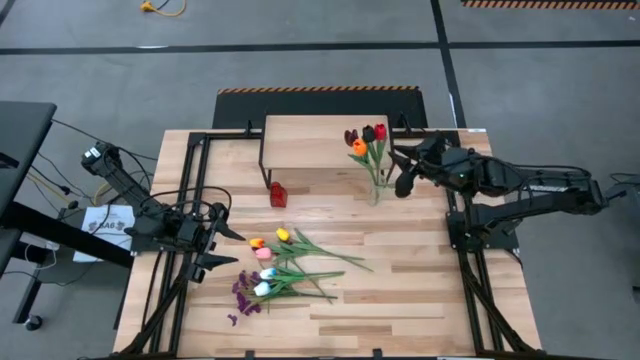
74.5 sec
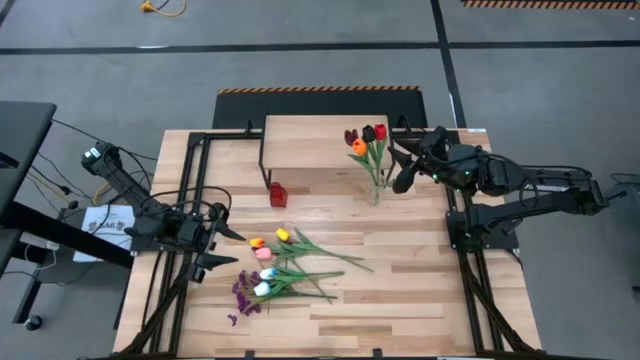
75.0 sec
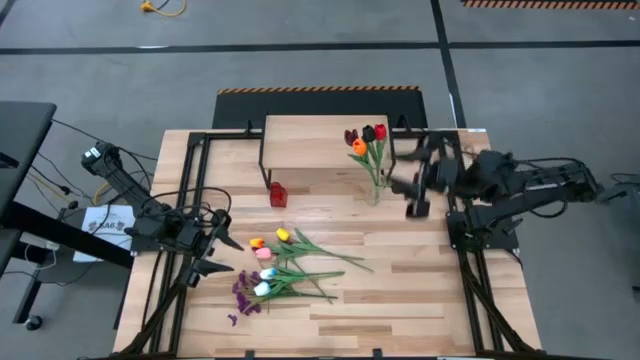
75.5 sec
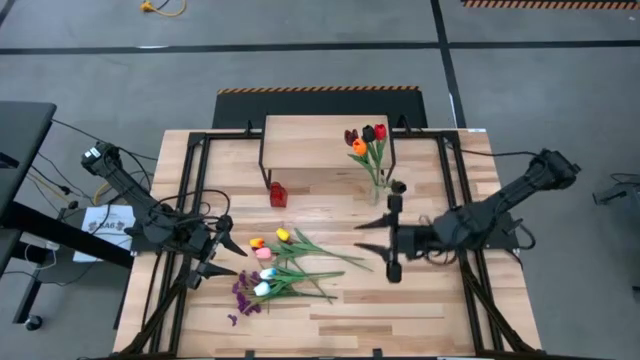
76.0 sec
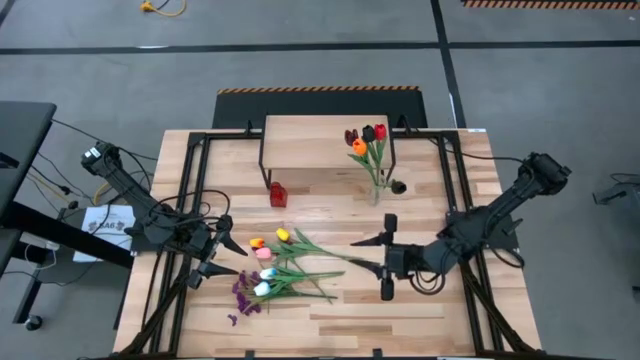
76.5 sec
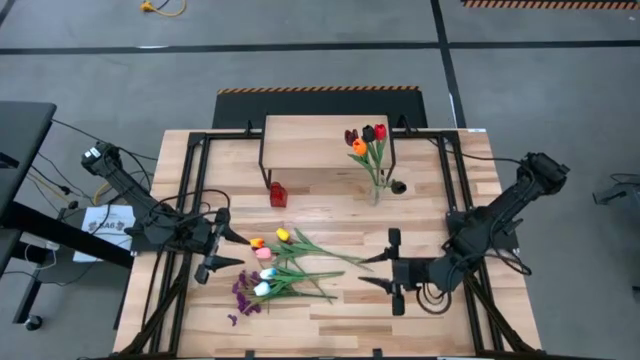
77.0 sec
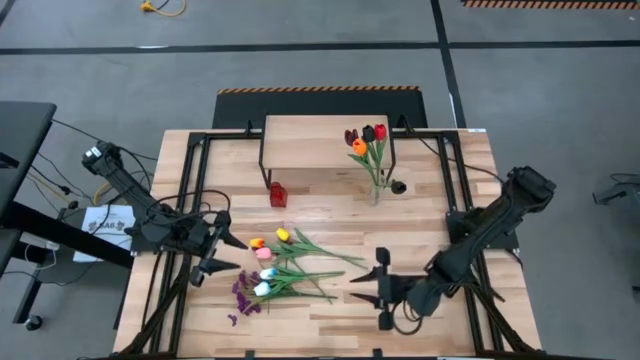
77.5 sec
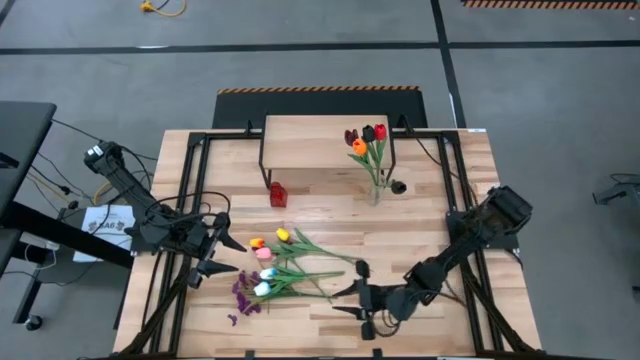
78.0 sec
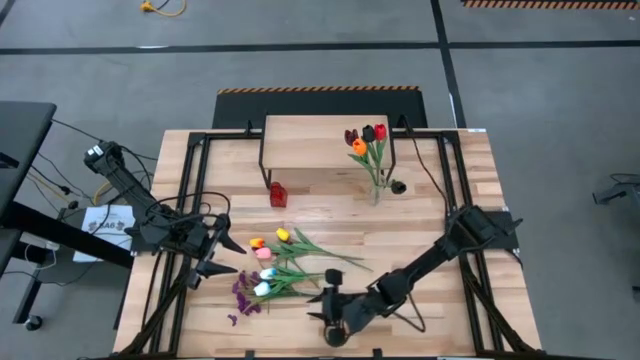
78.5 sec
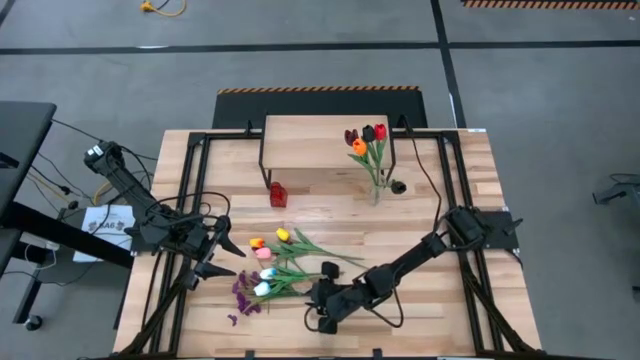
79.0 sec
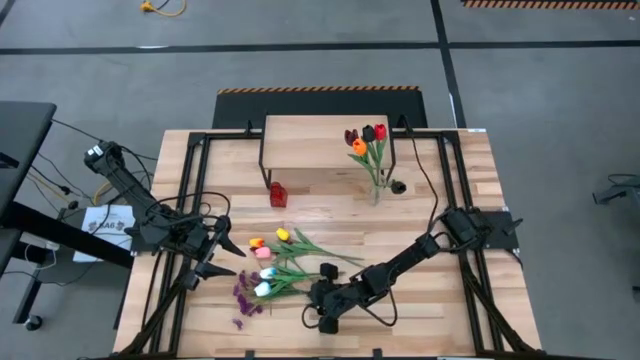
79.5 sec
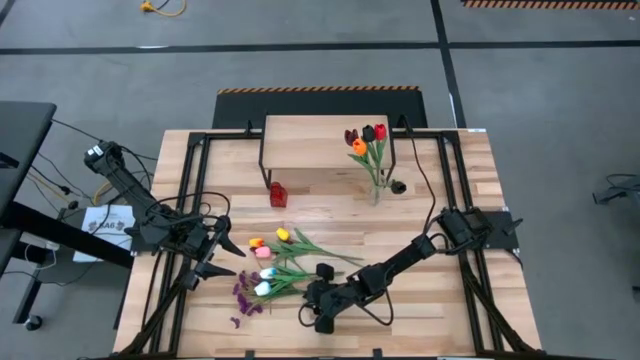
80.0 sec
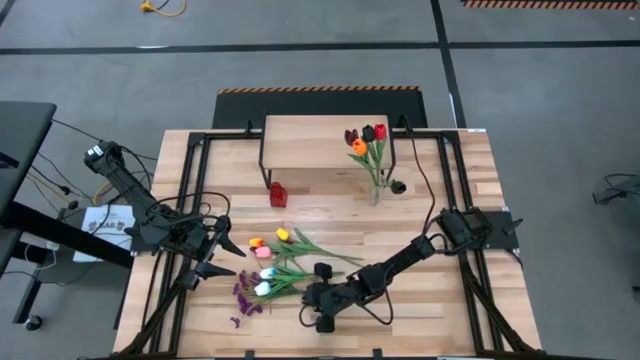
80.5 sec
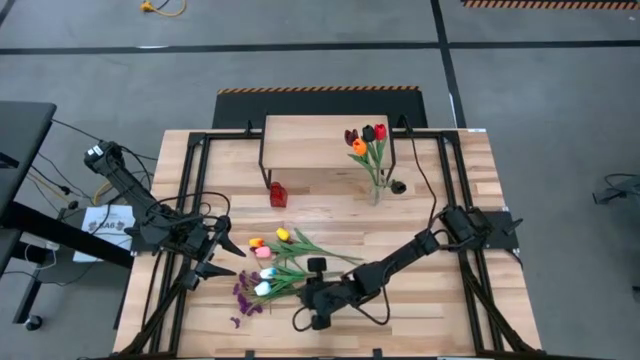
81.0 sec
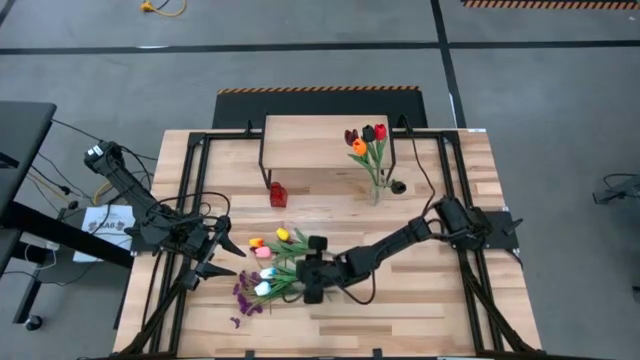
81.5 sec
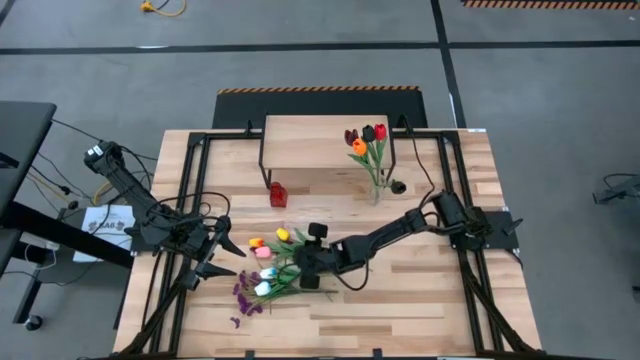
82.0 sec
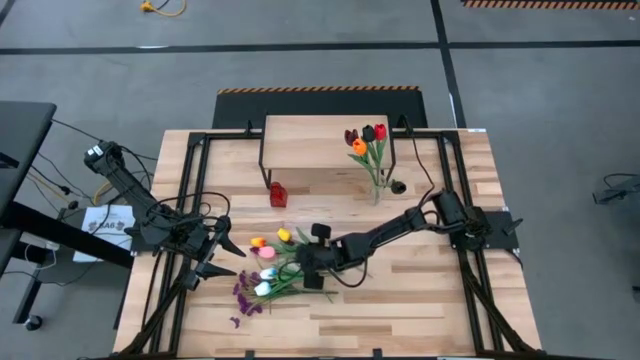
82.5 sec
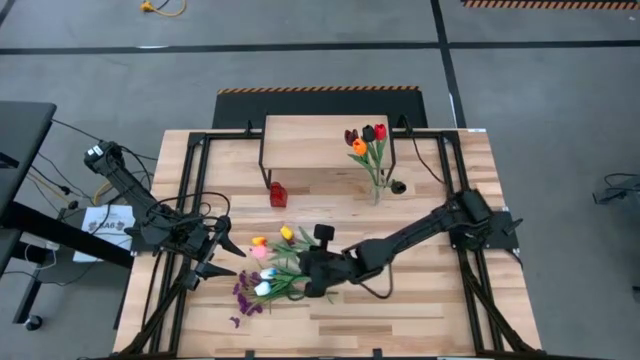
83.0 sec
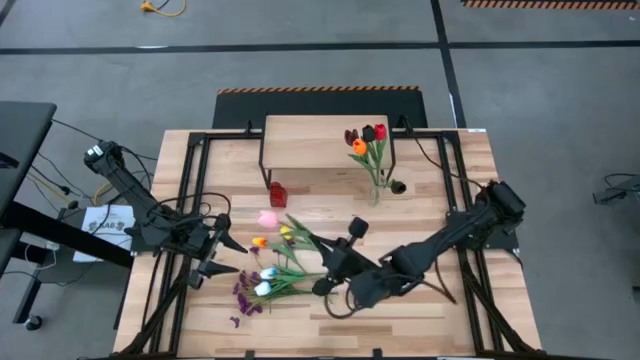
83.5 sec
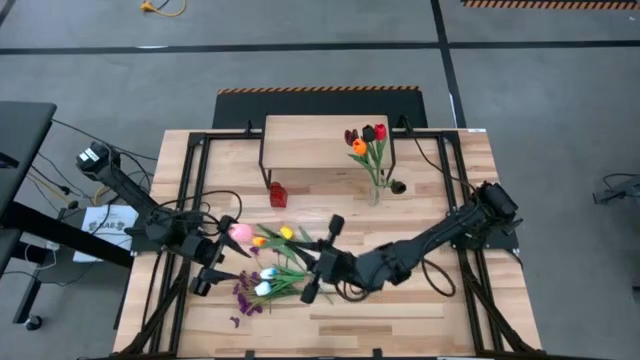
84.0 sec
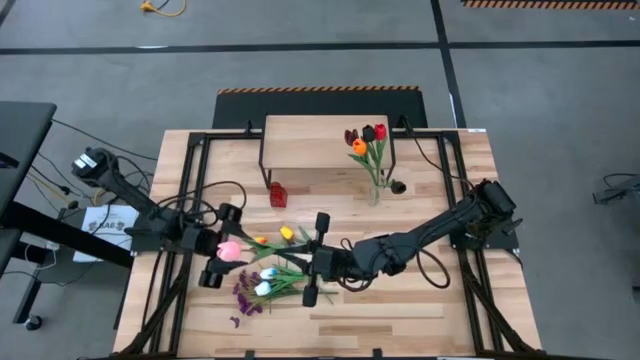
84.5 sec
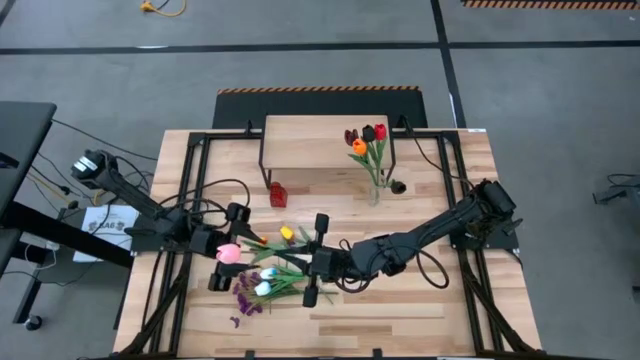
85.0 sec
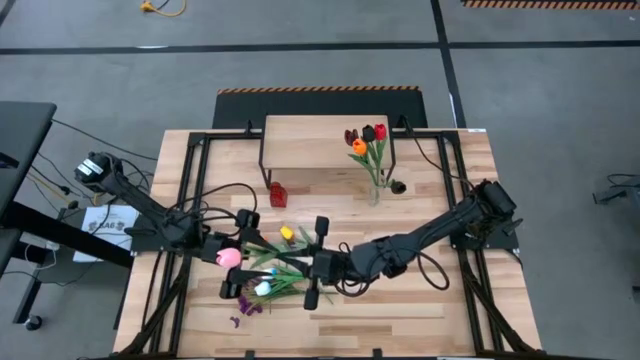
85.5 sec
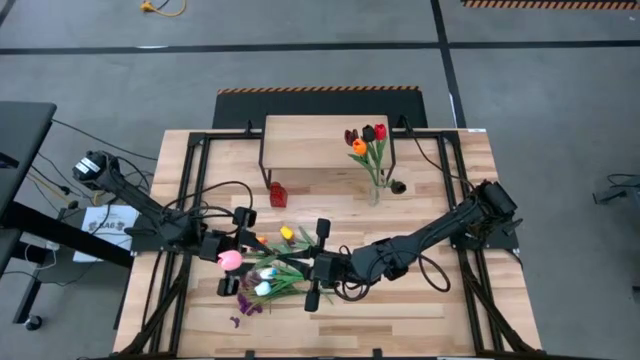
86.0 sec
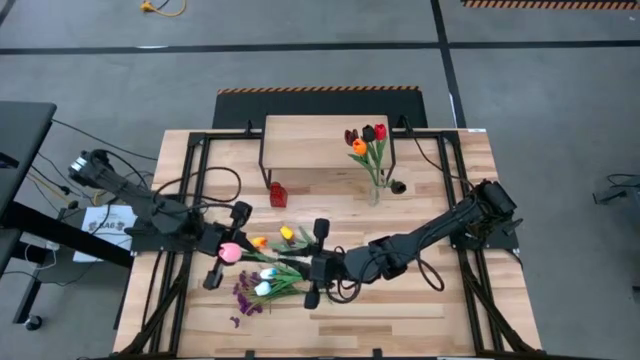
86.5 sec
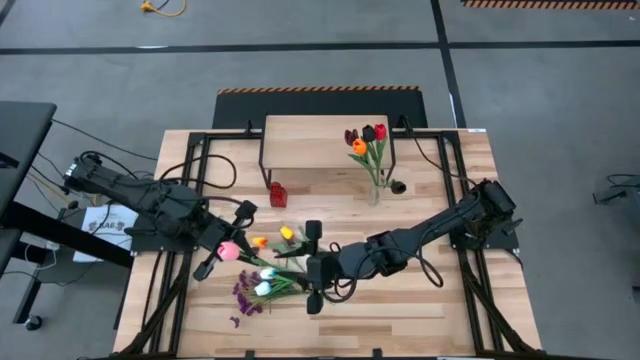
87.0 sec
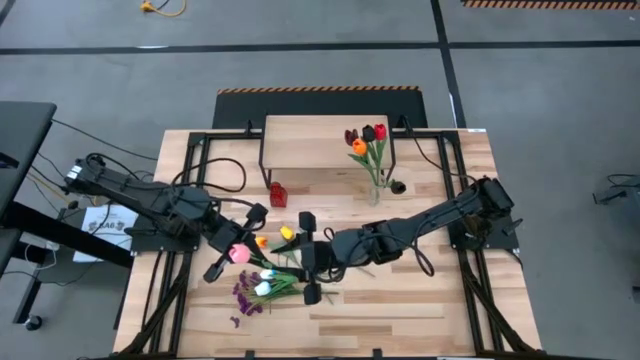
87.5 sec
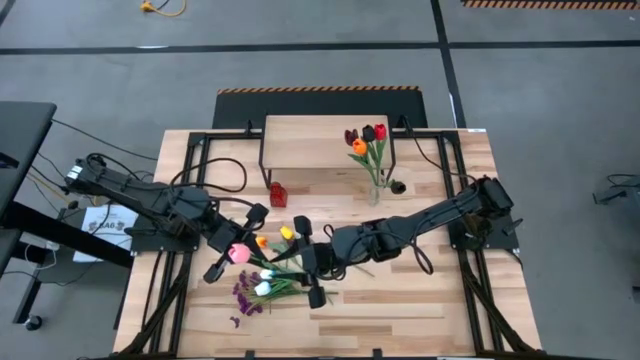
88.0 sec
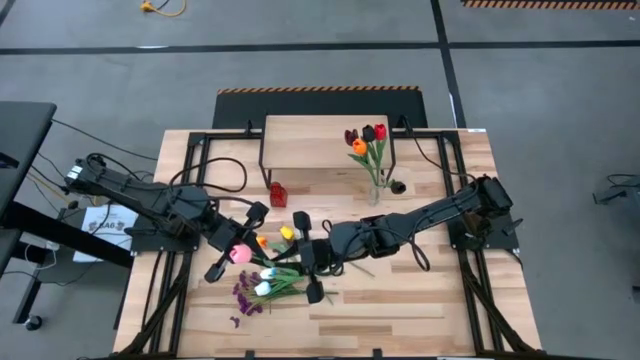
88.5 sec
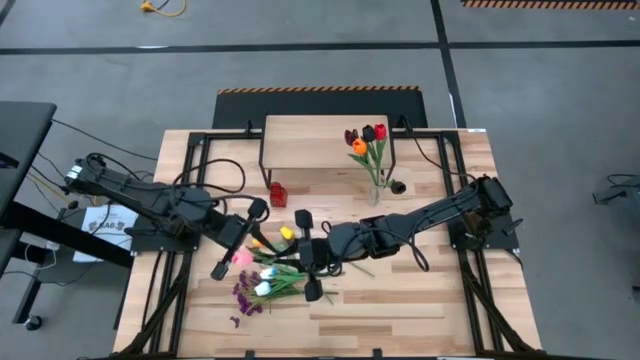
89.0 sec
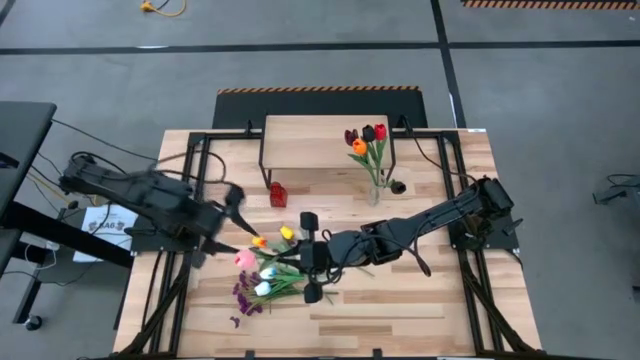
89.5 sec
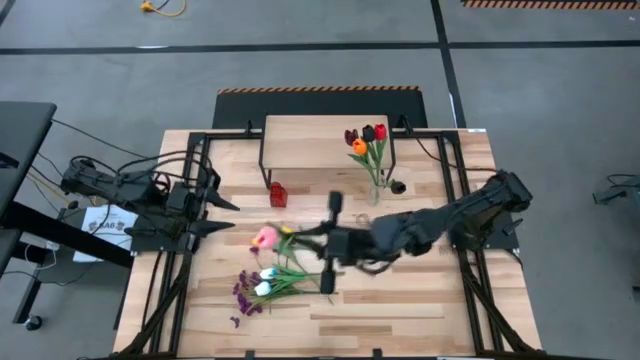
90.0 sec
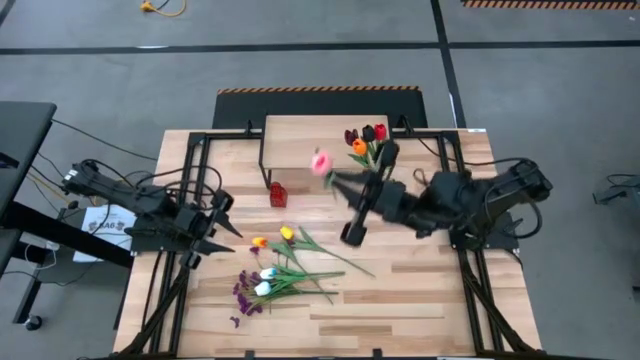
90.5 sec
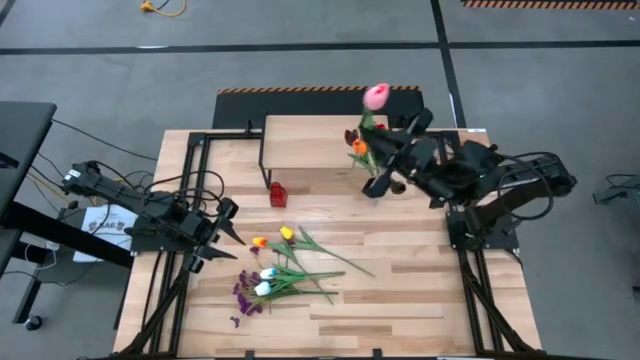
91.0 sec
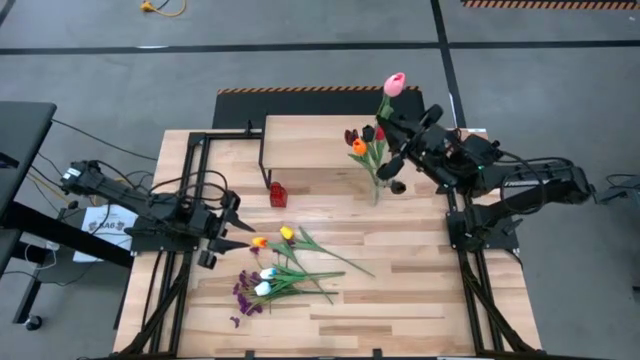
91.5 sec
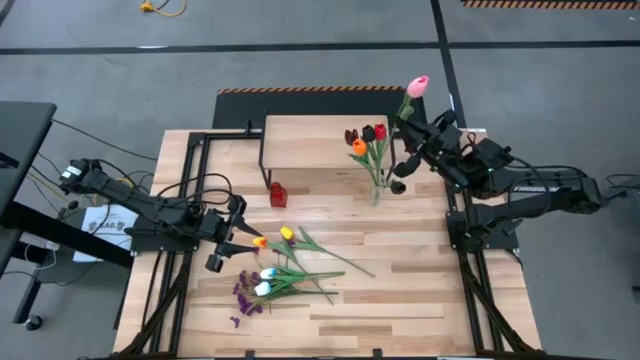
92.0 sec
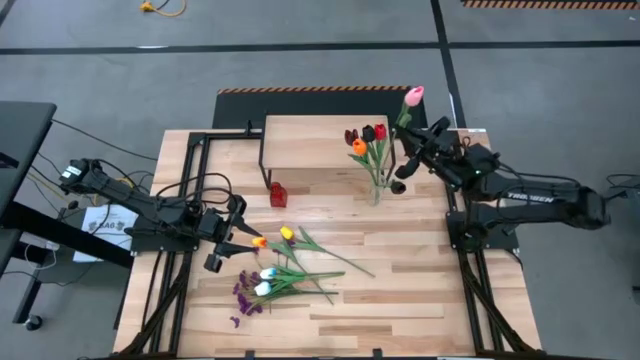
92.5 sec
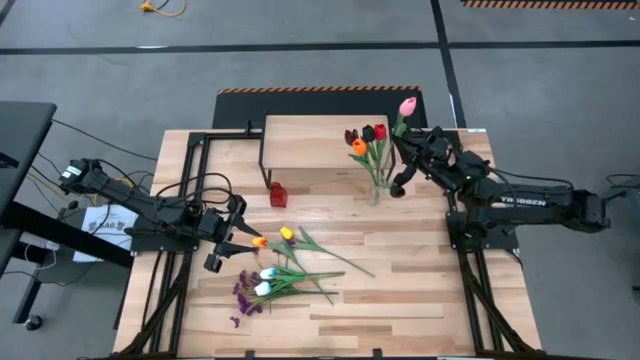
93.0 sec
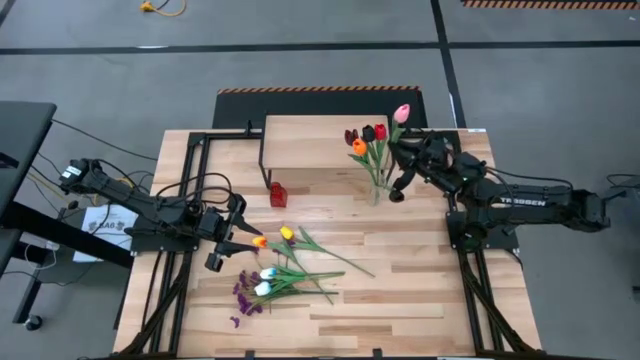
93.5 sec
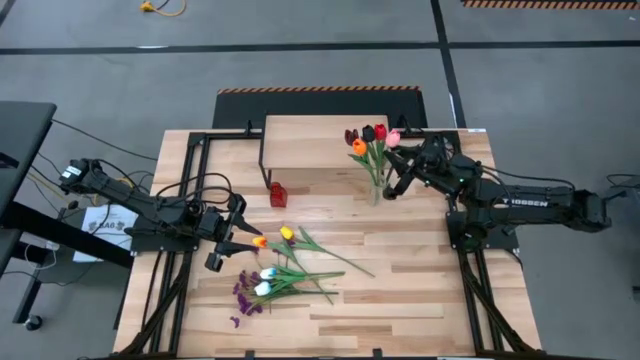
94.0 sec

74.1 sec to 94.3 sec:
Task: Pick and place flowers into a vace then onto a shelf
Put the light pink flower into the transparent vase

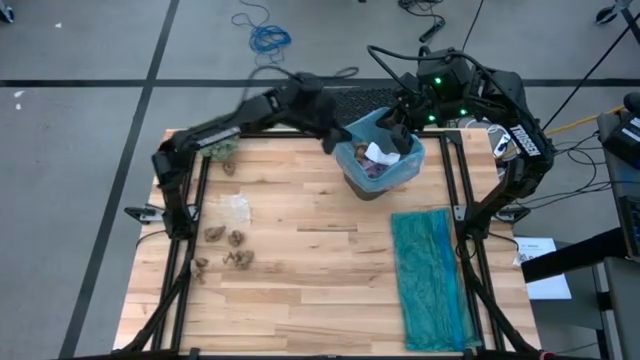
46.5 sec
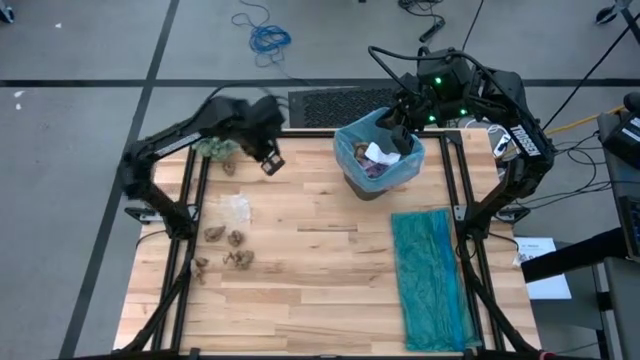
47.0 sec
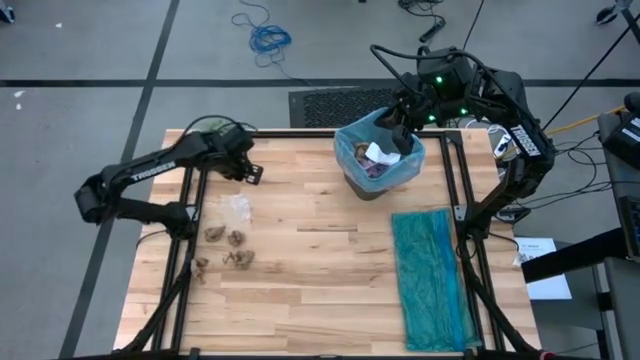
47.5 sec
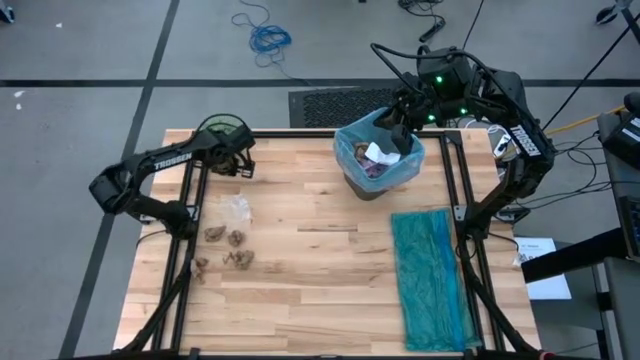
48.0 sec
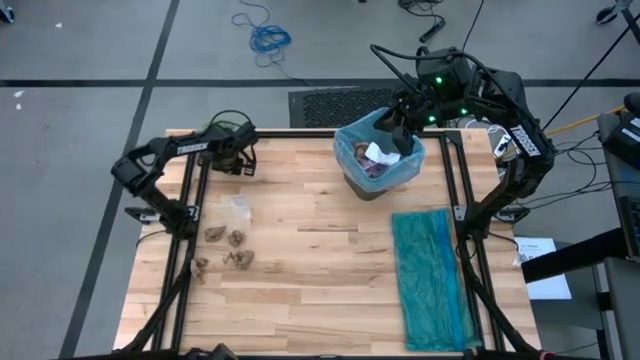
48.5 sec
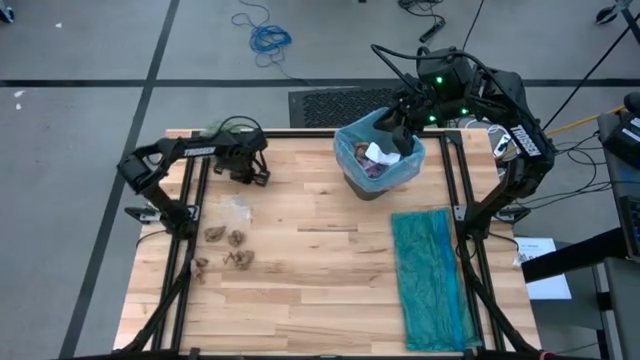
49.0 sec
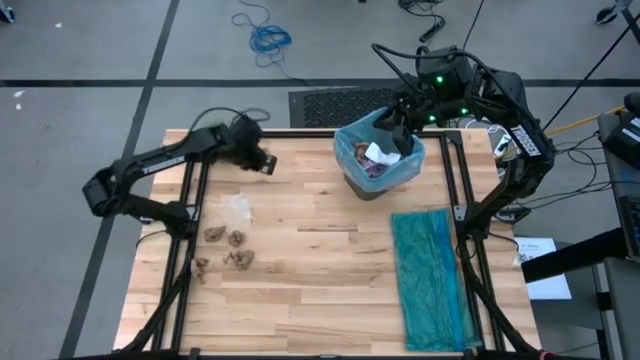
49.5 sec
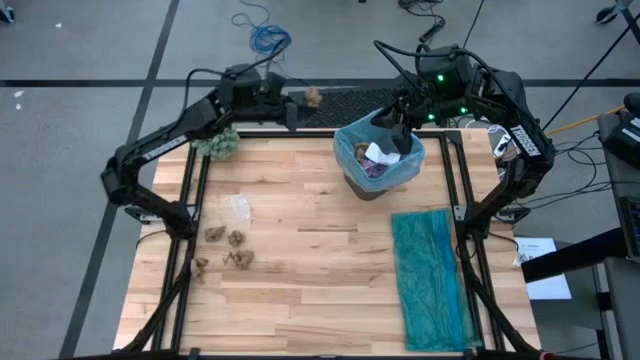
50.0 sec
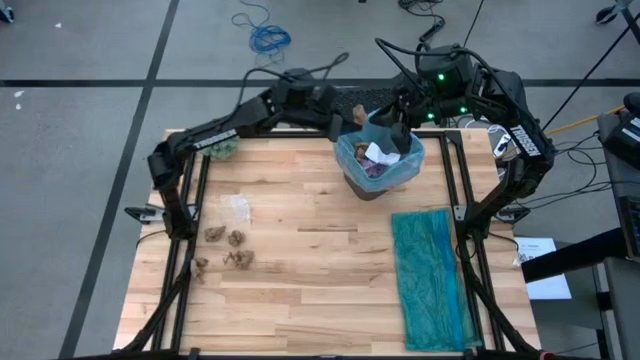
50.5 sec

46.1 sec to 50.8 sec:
Task: place trash/remove bag and relplace
Put the brown paper into the trash bin
